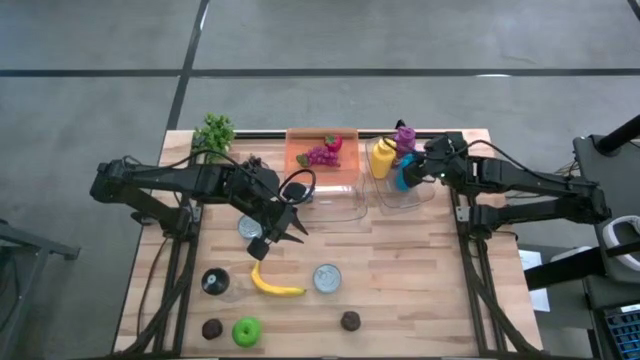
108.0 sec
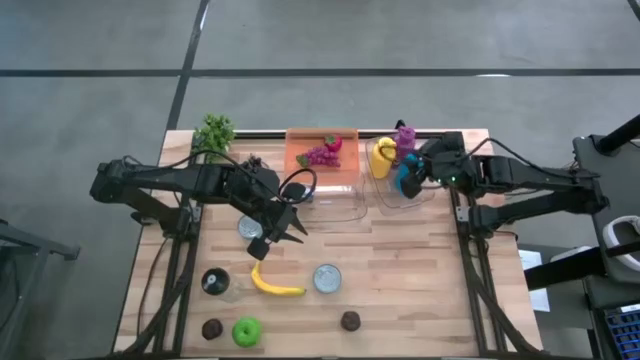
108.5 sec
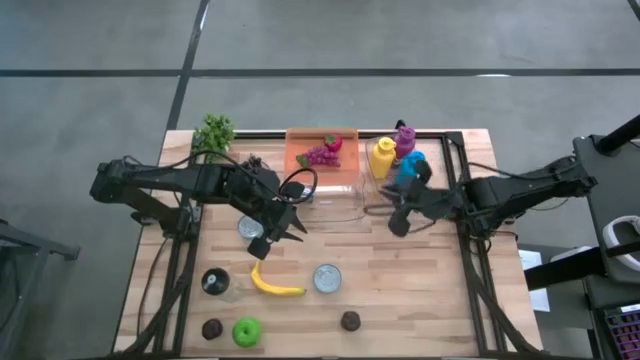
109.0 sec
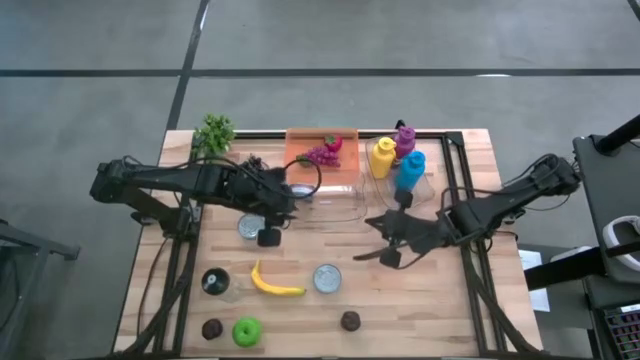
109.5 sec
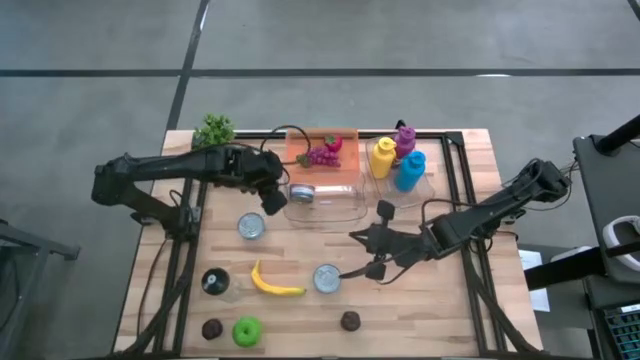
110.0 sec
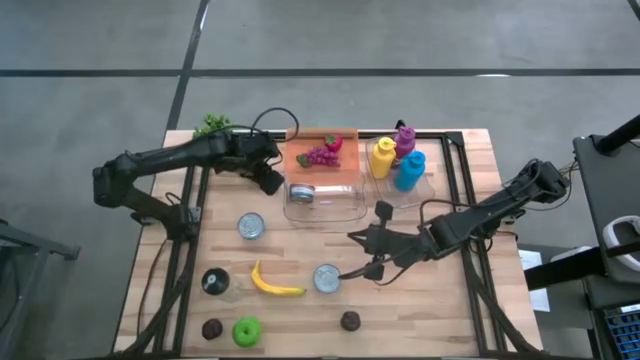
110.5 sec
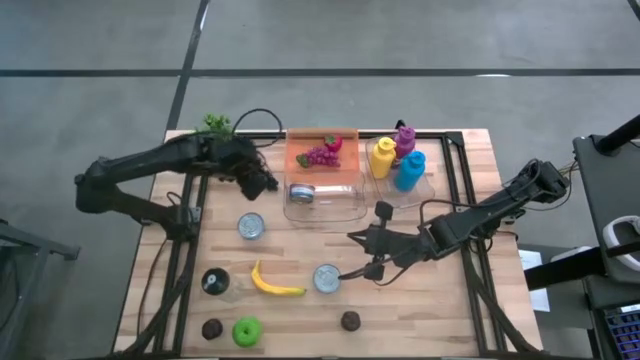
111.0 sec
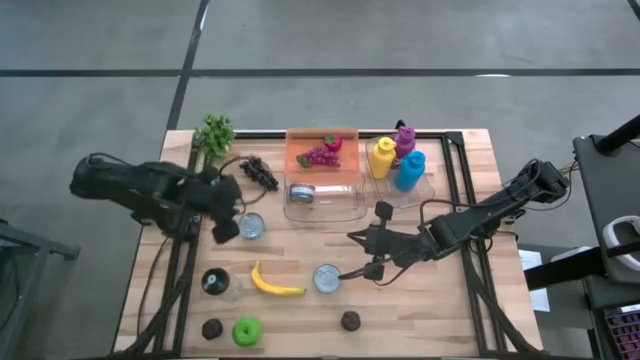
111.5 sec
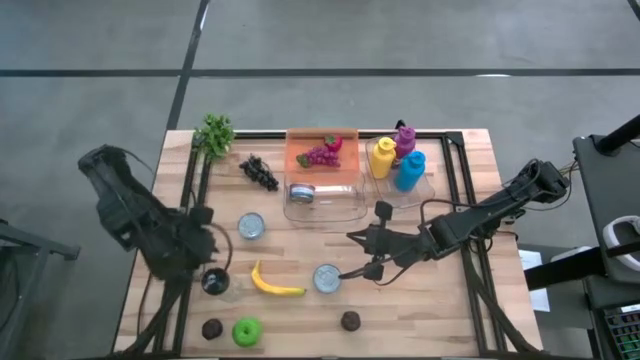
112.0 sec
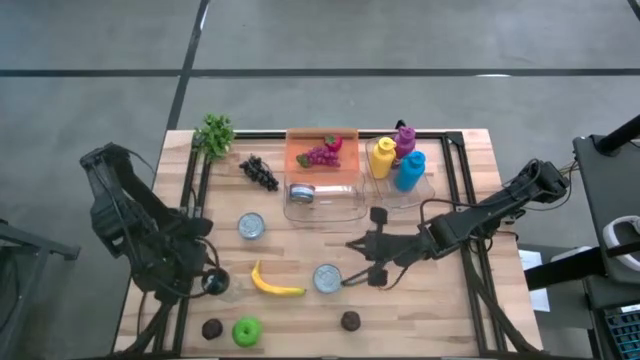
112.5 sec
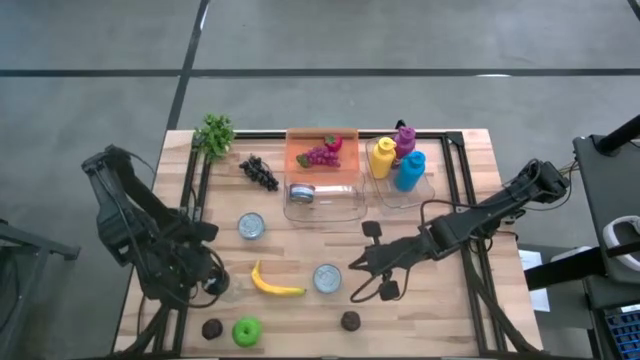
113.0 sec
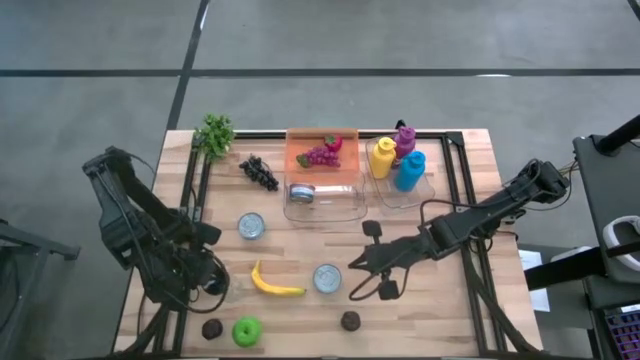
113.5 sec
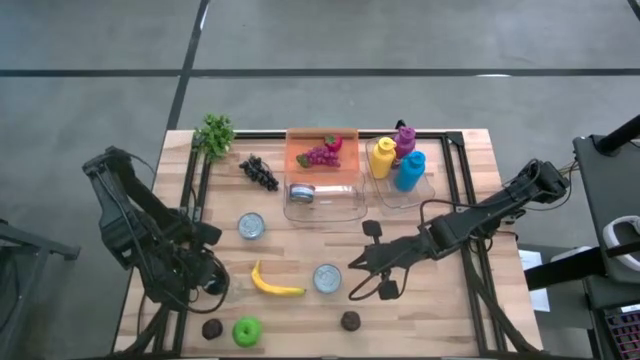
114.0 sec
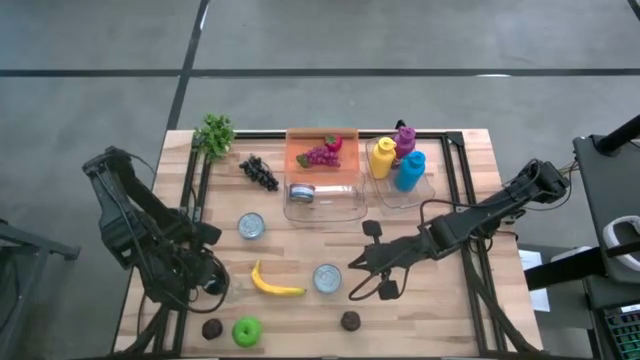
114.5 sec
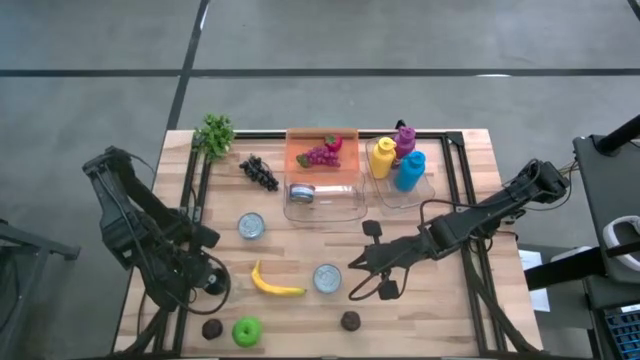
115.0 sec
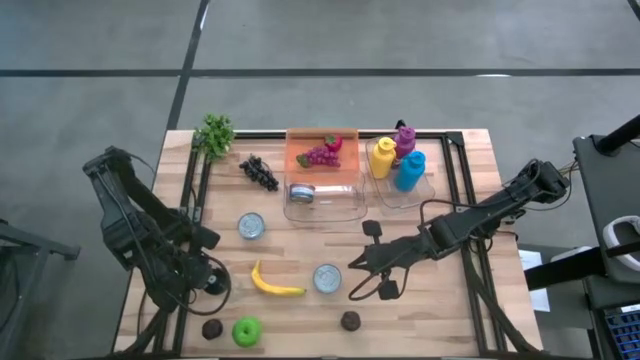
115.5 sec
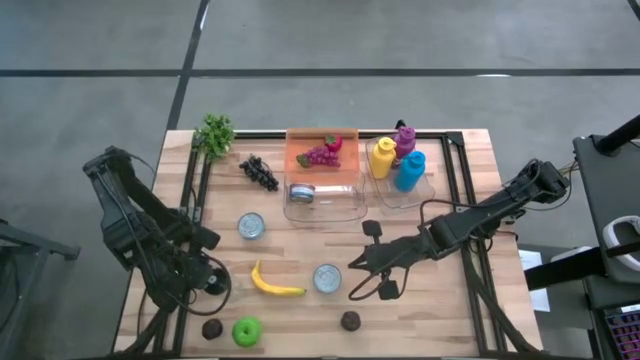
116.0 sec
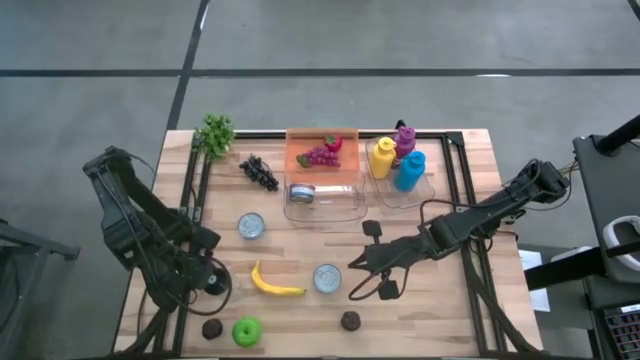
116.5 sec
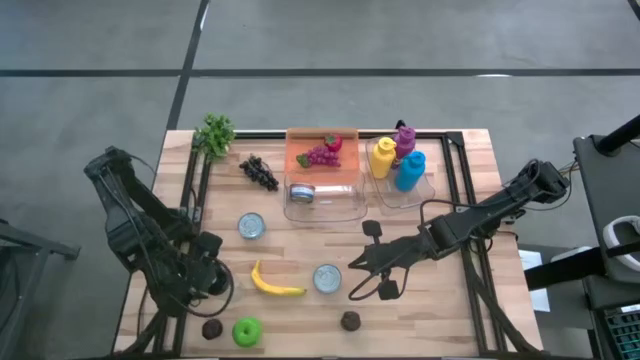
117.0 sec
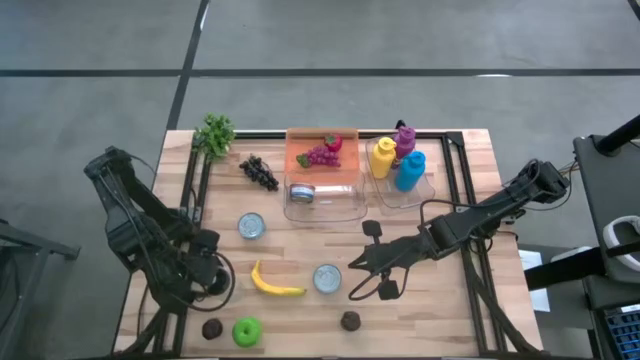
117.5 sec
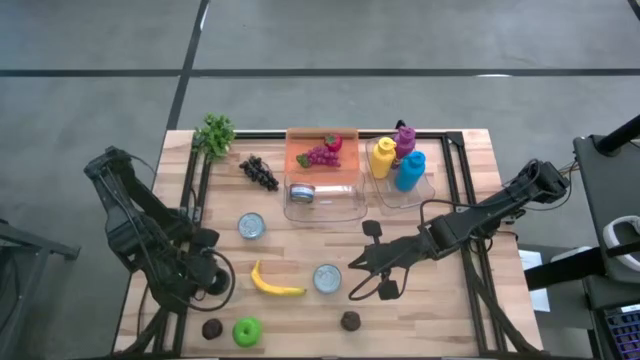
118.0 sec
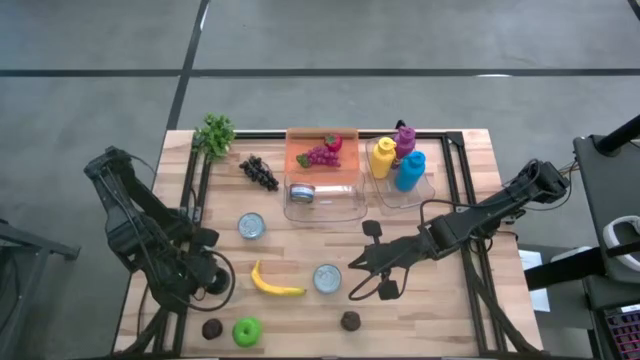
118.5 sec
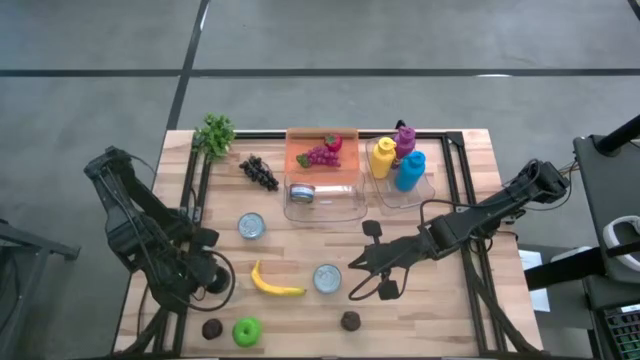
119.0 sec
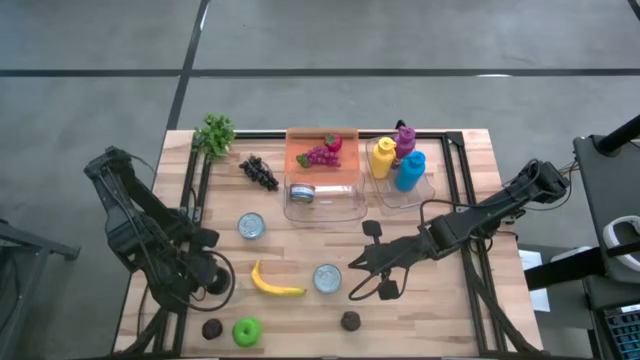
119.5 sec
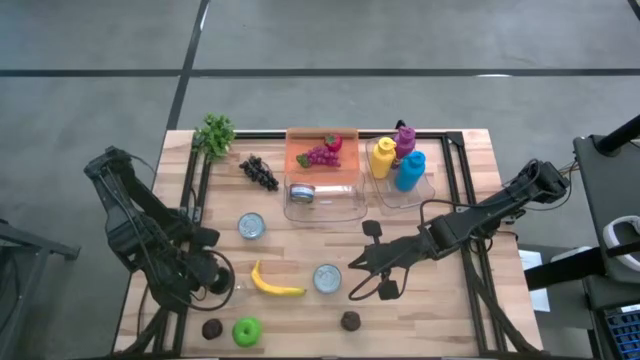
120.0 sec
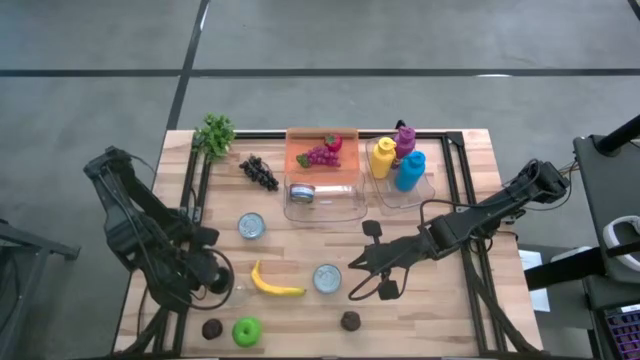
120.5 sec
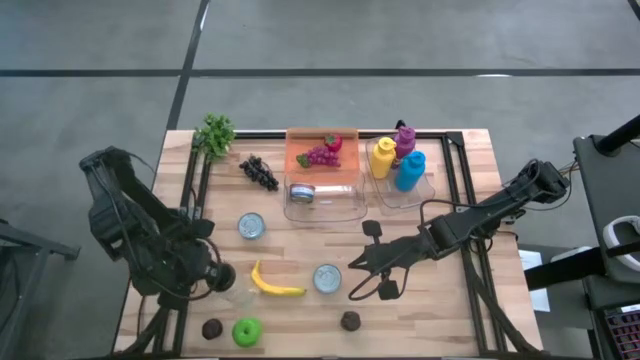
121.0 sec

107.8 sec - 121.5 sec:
Task: Pick & Place Food Item
Put the transparent water bottle into the right transparent bin

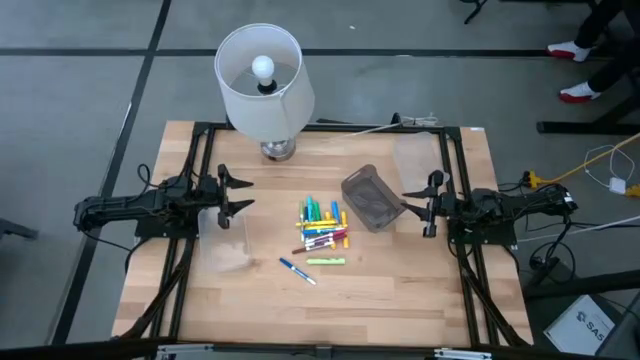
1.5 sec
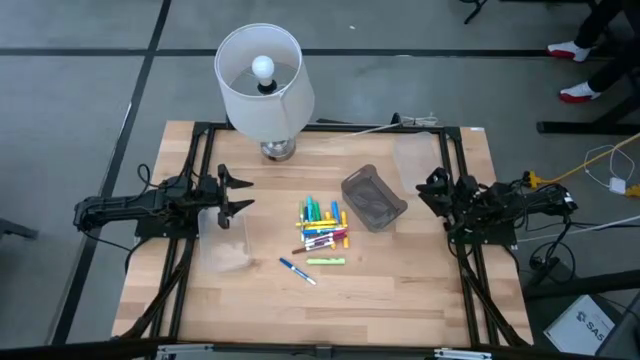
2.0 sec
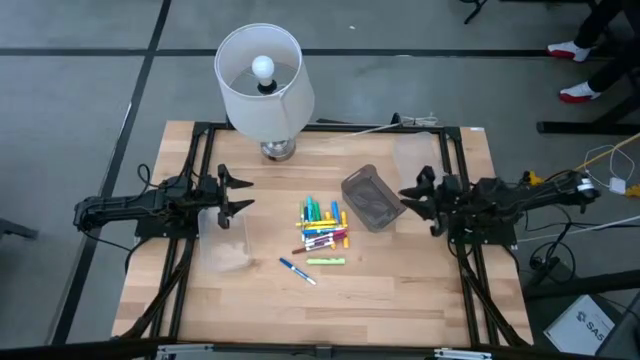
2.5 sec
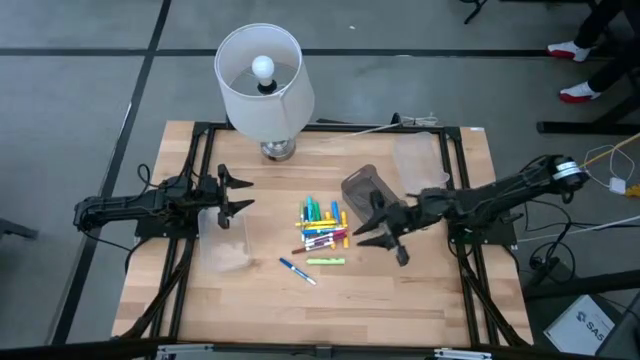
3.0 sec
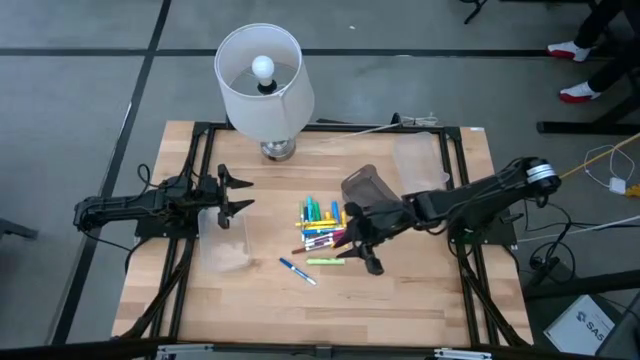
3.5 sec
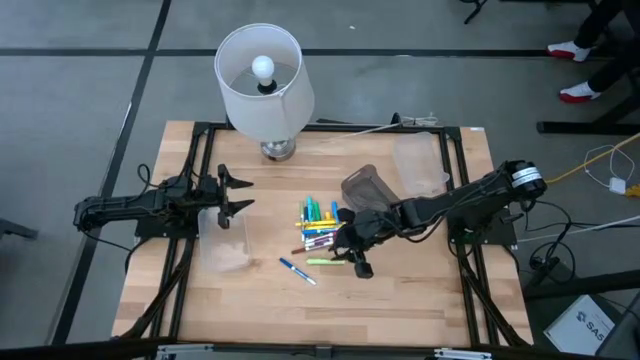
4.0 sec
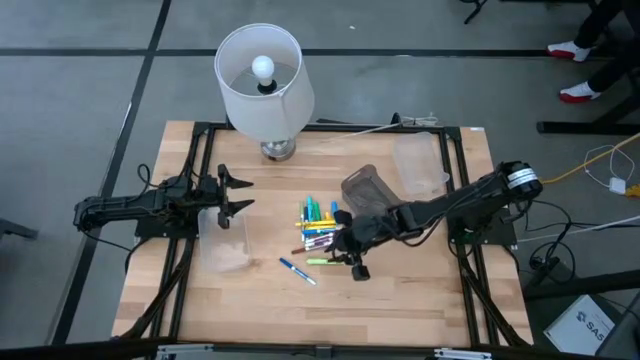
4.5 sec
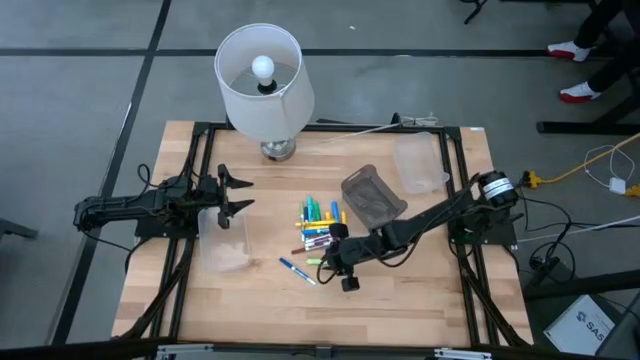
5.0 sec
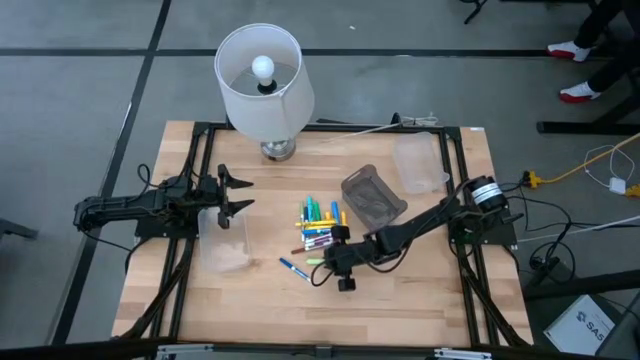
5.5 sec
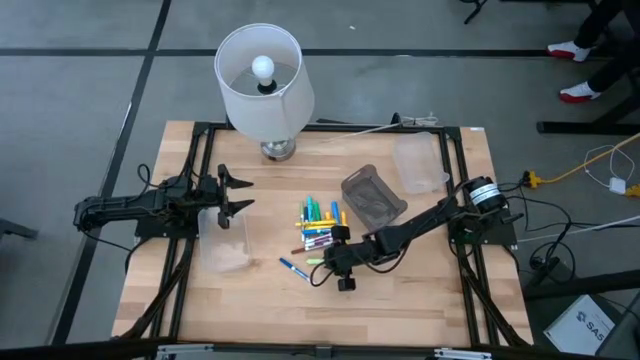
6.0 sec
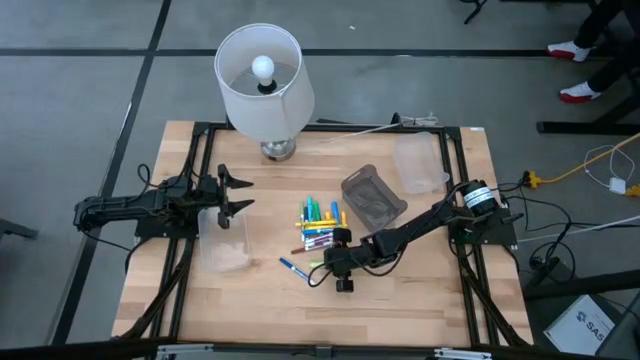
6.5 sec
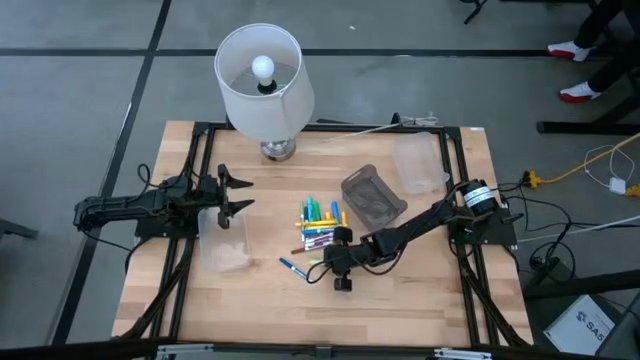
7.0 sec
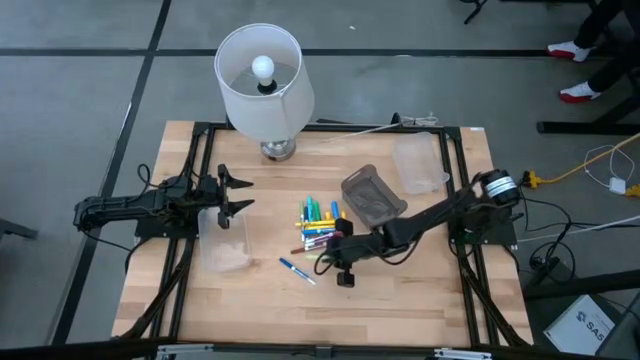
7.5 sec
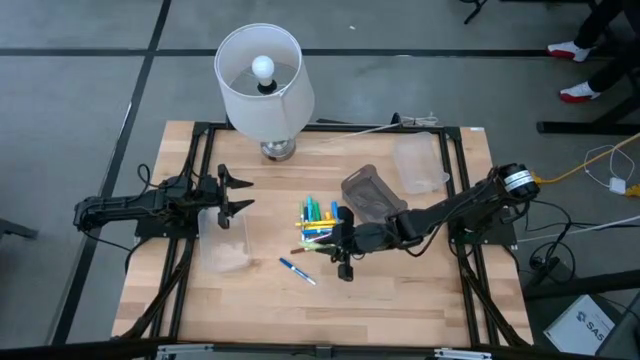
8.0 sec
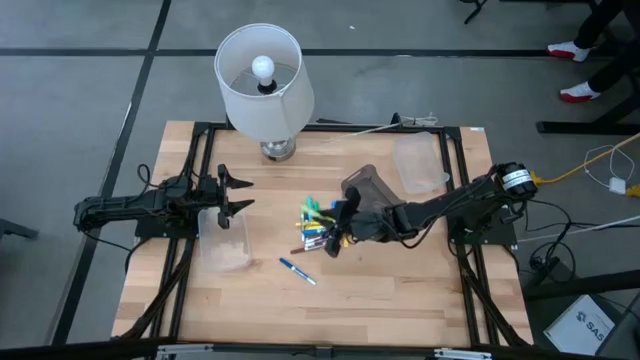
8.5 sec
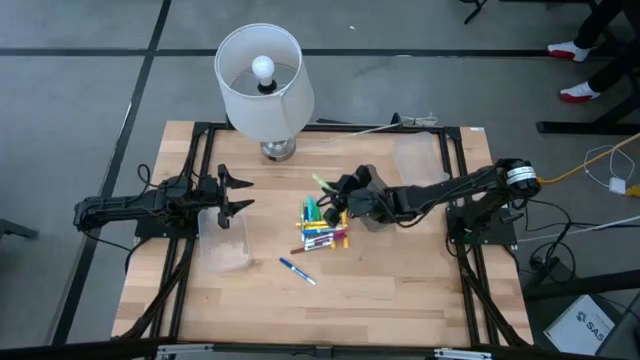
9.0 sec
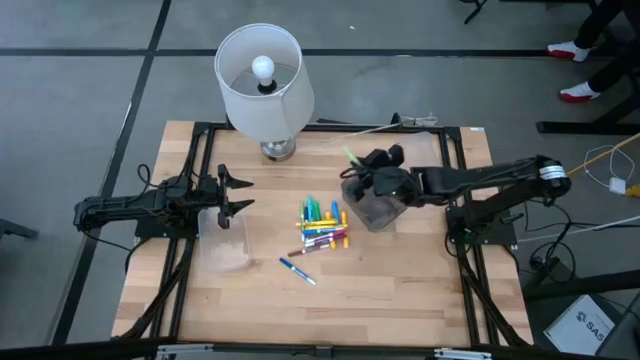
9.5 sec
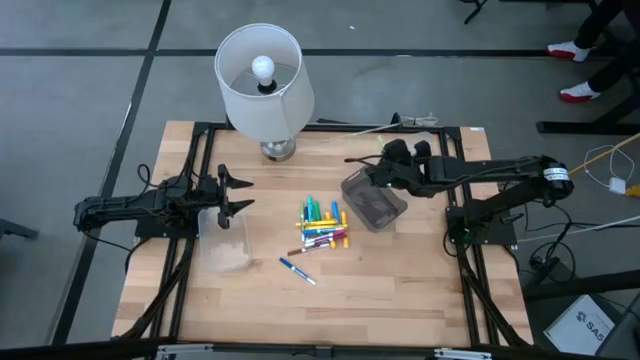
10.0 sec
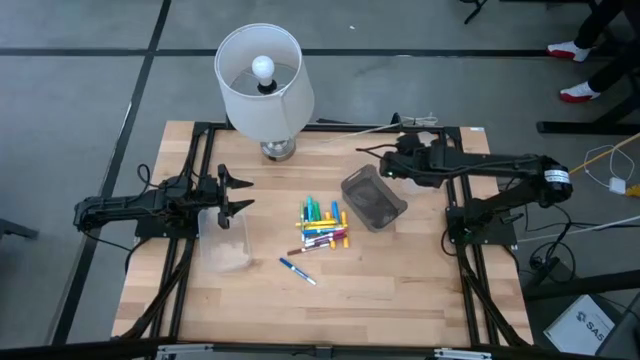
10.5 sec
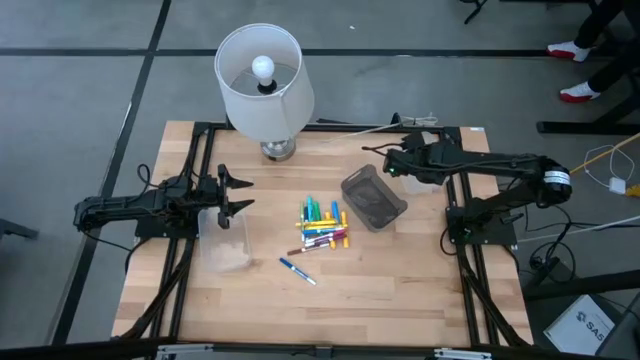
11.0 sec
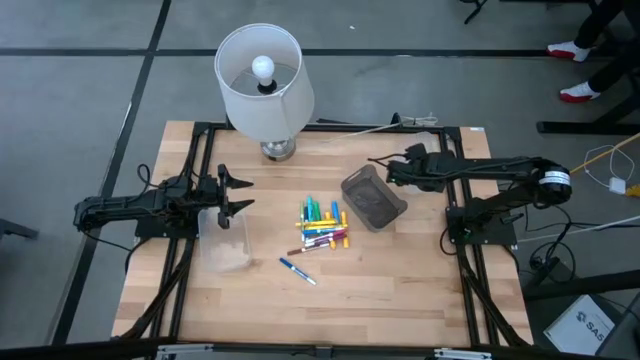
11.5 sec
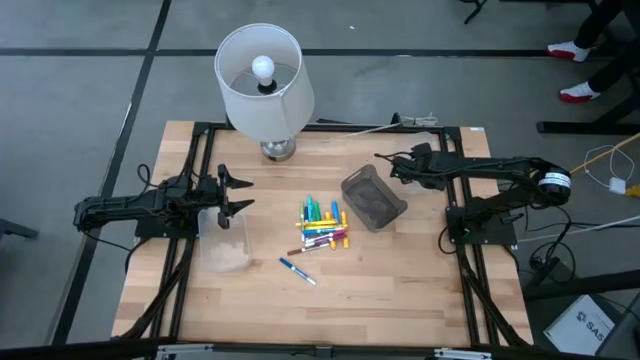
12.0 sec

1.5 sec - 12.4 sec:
Task: Pick & Place Markers
Put the light green highlighter pen into the right transparent bin
